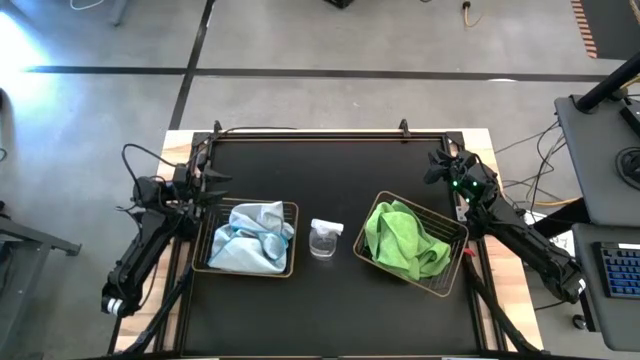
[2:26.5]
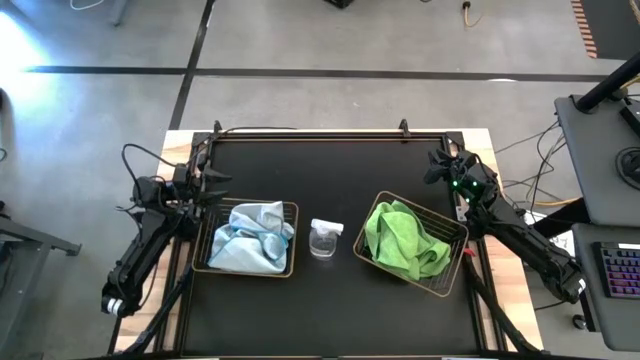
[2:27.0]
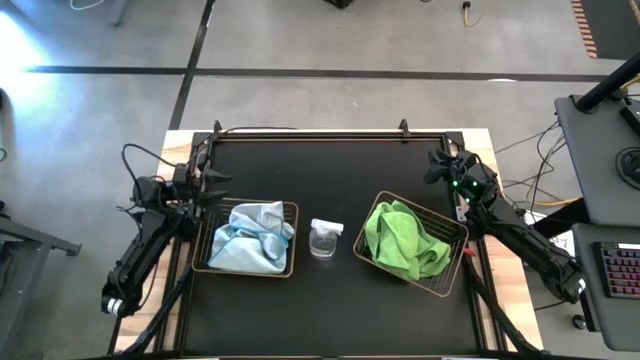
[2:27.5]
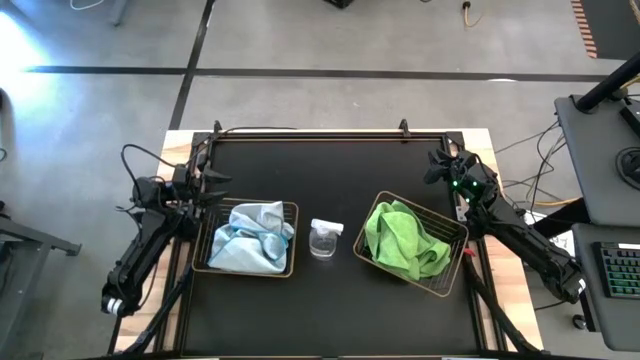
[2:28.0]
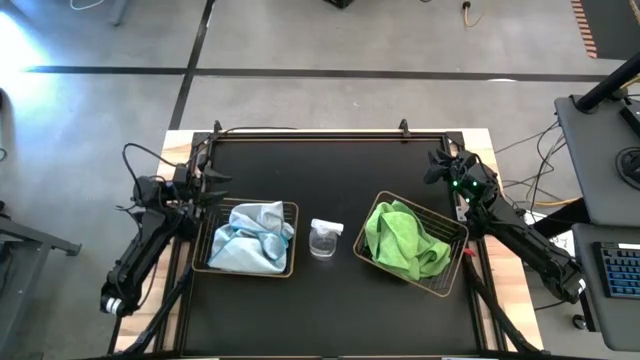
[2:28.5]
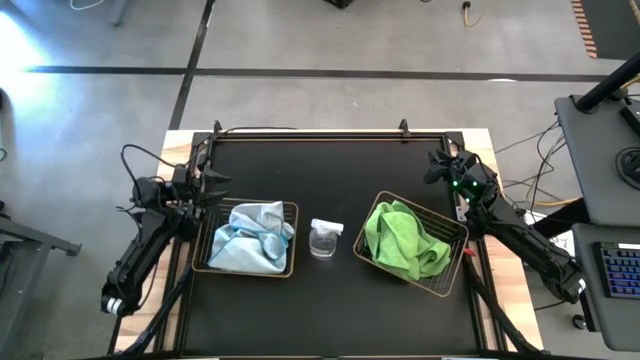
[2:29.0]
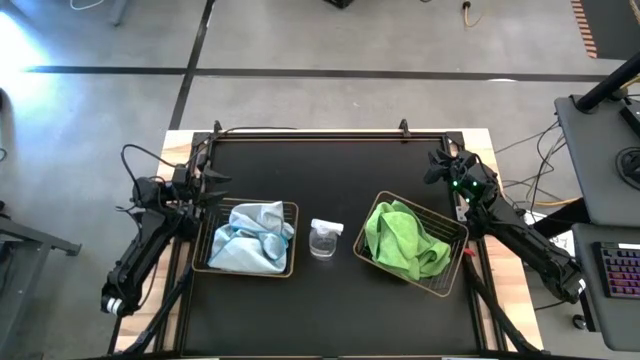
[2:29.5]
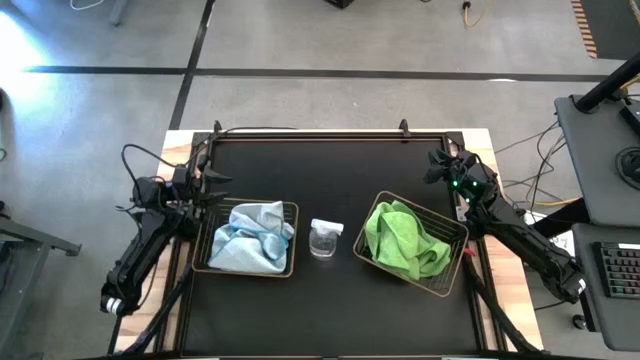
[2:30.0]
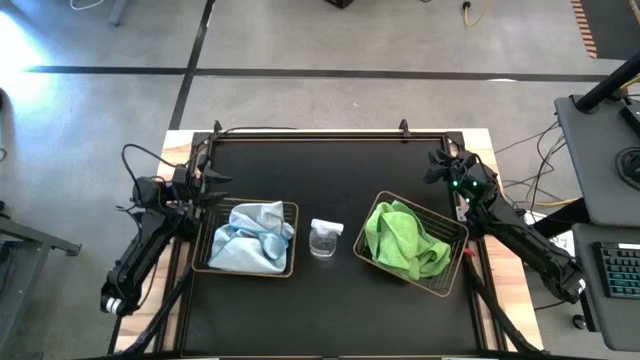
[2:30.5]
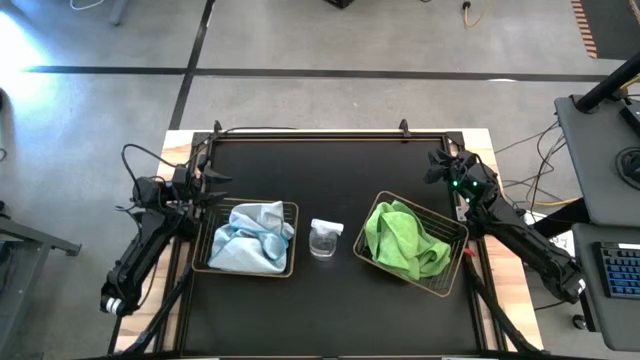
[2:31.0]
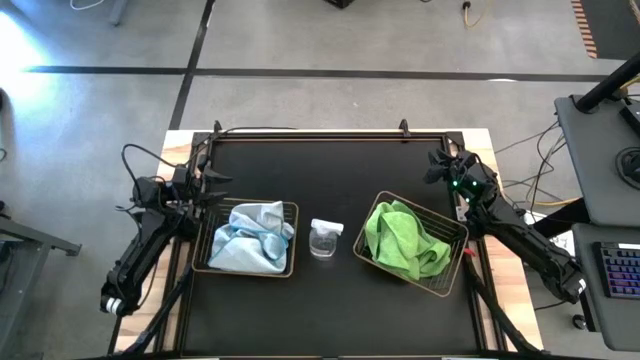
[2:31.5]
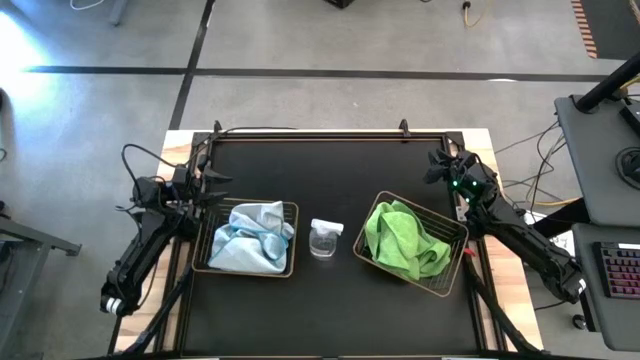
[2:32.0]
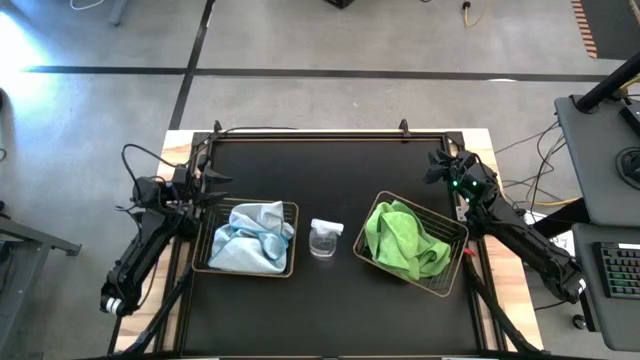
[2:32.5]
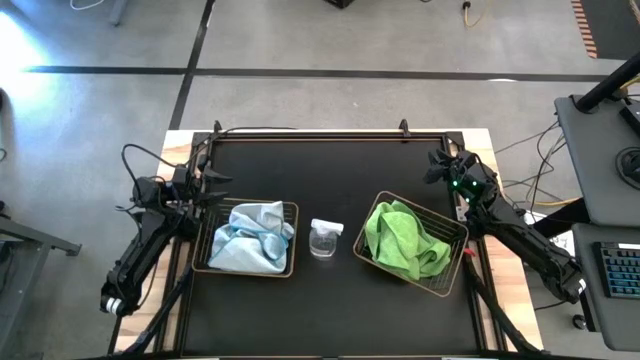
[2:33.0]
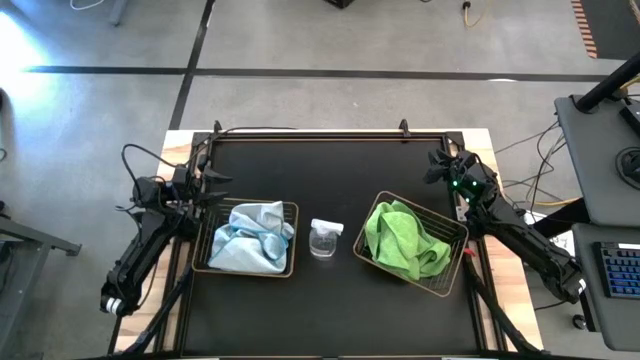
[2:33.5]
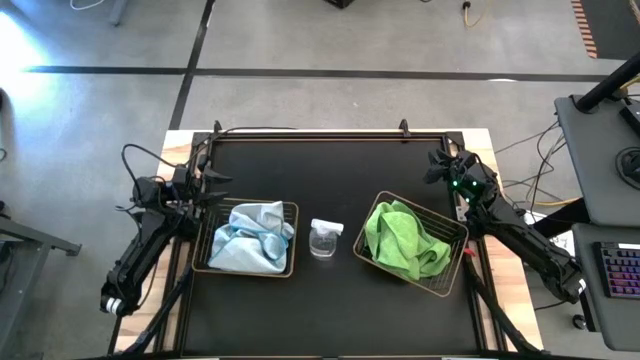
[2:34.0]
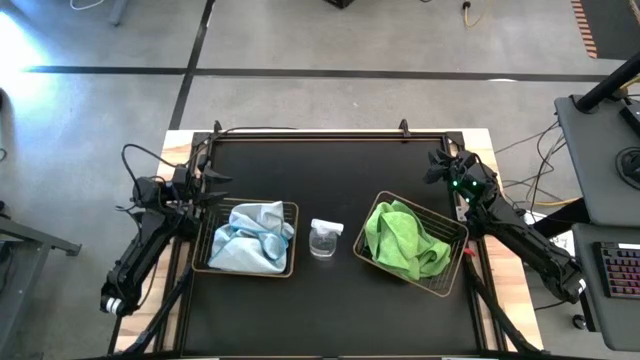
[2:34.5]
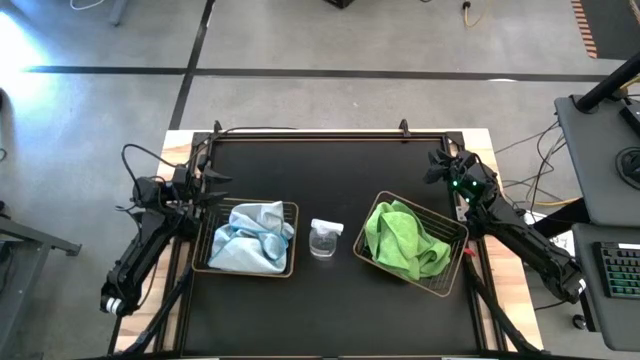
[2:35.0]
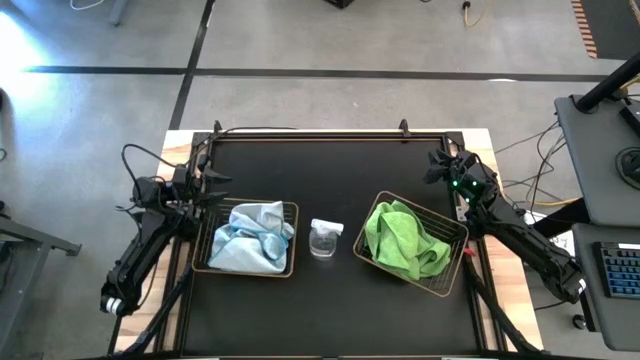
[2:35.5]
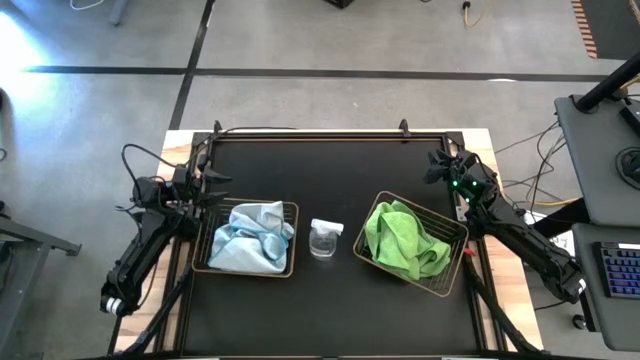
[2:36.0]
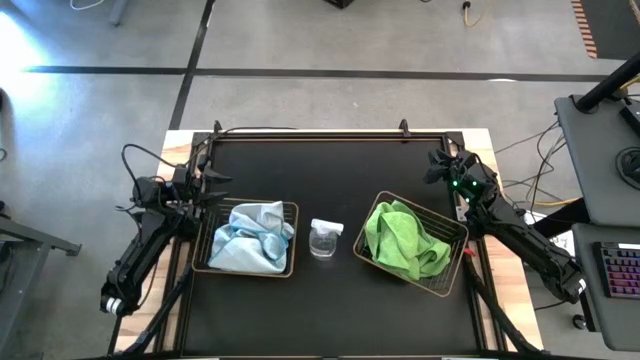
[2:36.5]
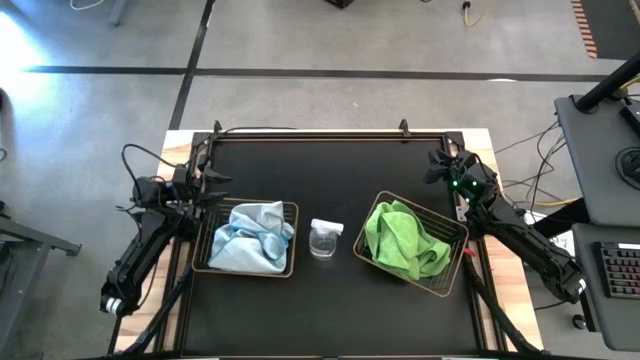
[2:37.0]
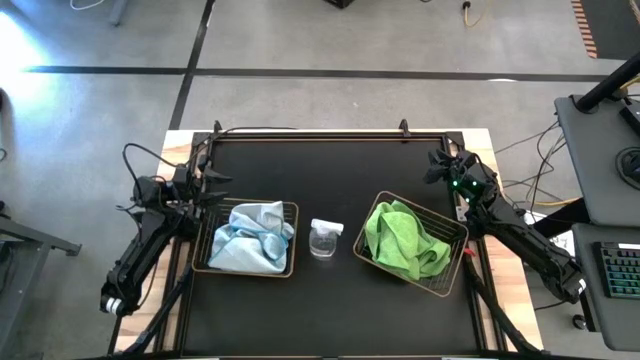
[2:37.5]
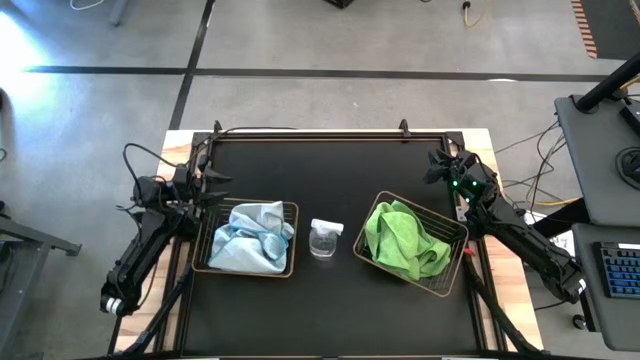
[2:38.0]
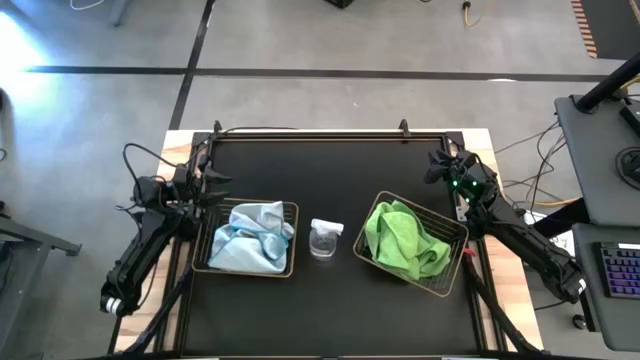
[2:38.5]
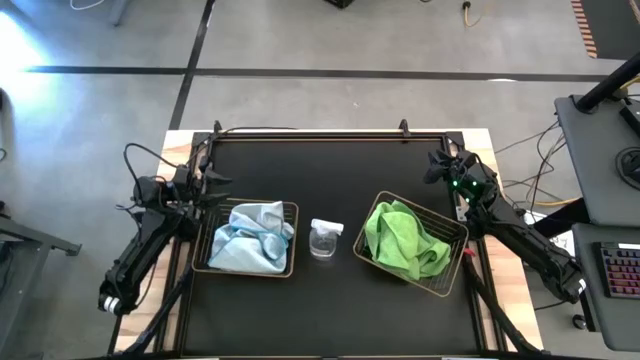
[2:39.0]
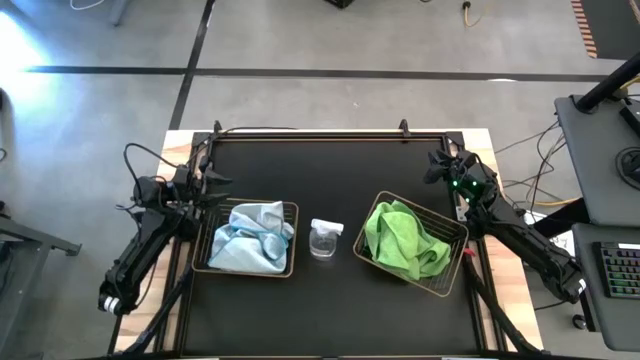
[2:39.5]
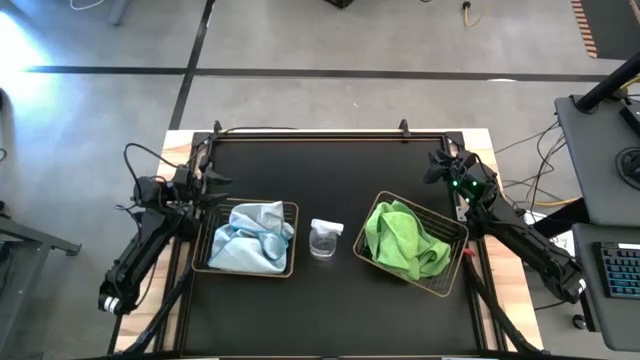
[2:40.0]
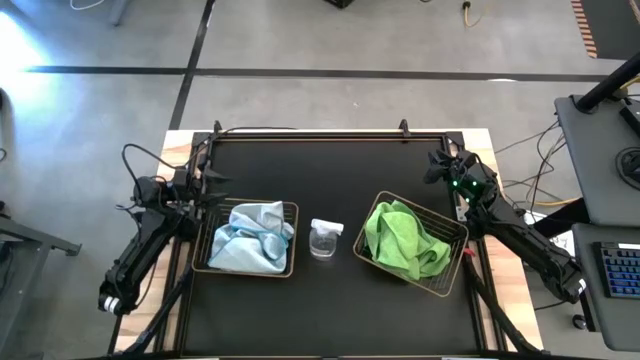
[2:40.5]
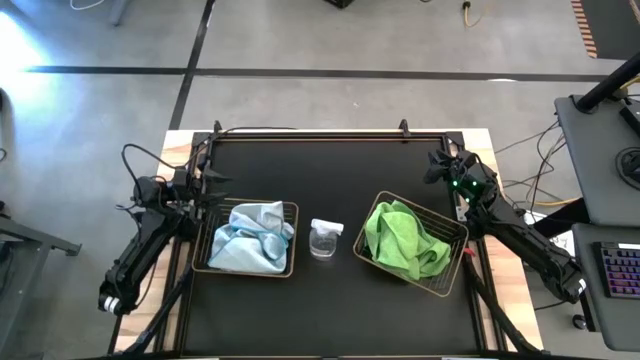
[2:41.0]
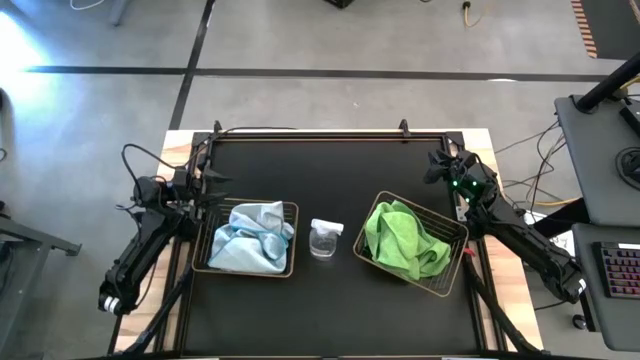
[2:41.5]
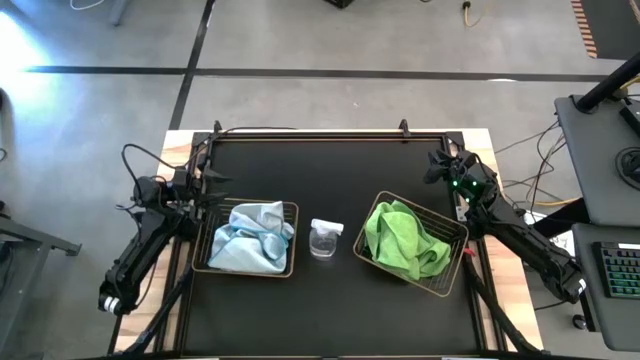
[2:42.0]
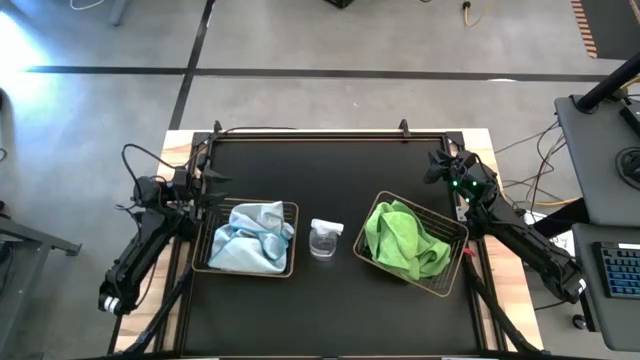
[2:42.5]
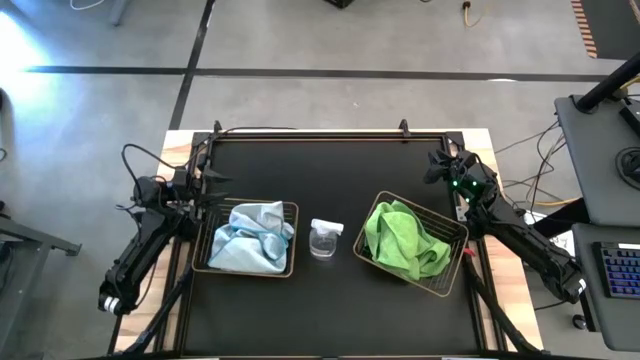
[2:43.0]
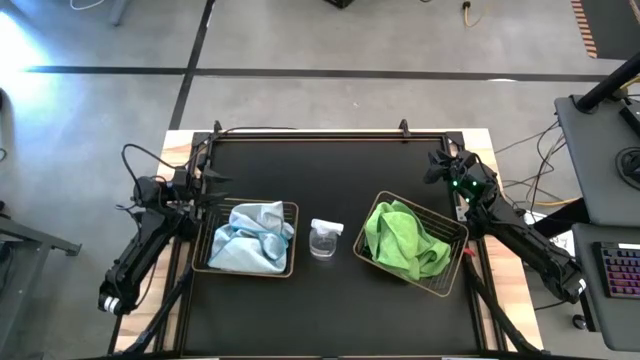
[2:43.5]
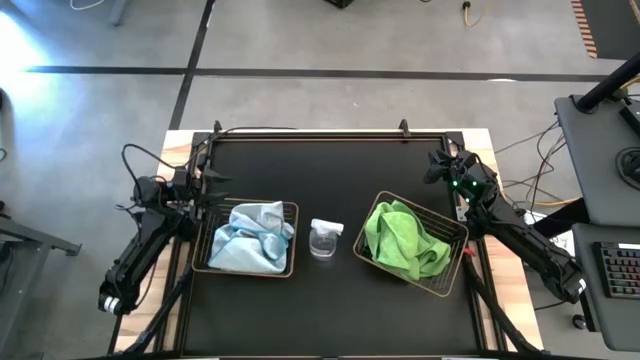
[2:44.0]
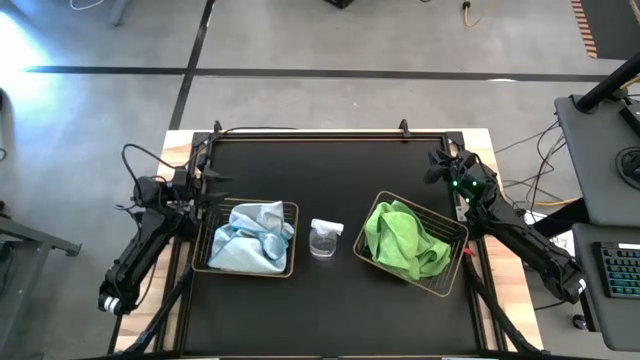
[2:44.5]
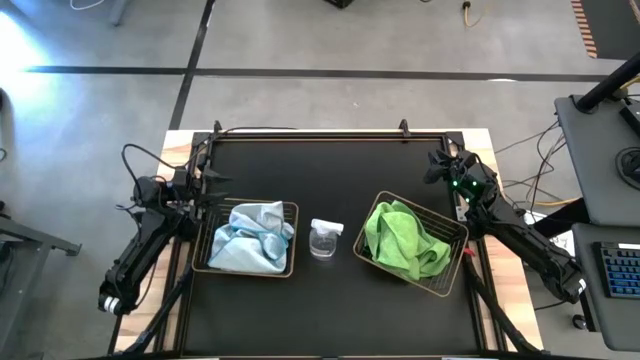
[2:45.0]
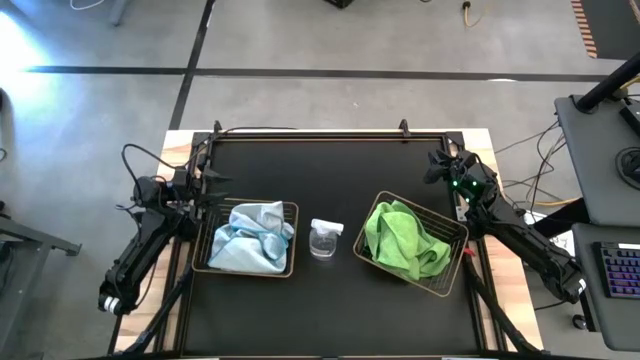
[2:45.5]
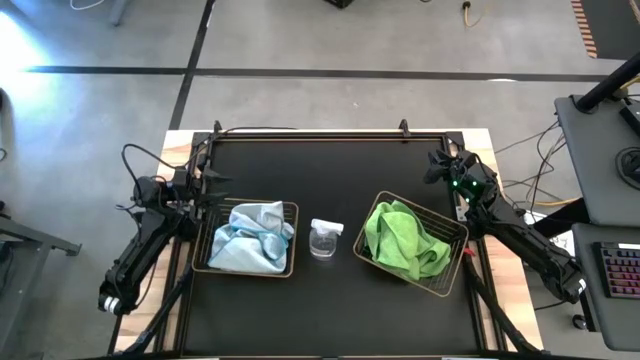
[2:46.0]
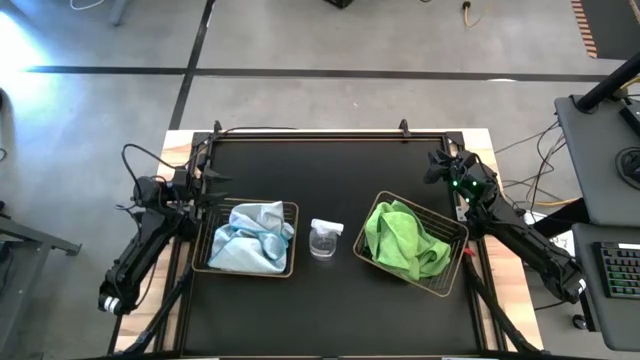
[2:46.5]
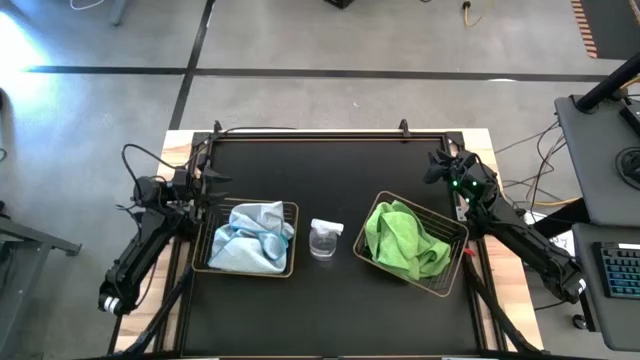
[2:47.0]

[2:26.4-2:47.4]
Task: Sort microfiber towel by color & place in baskets
Return to Home Position

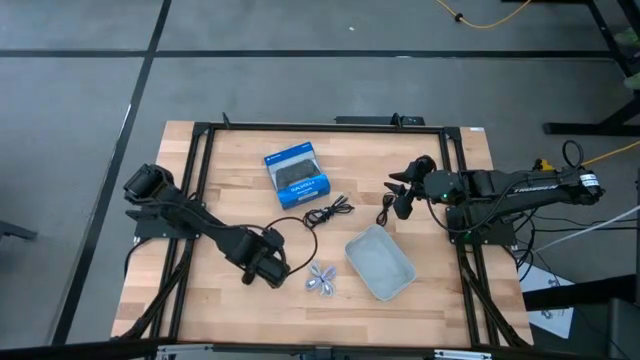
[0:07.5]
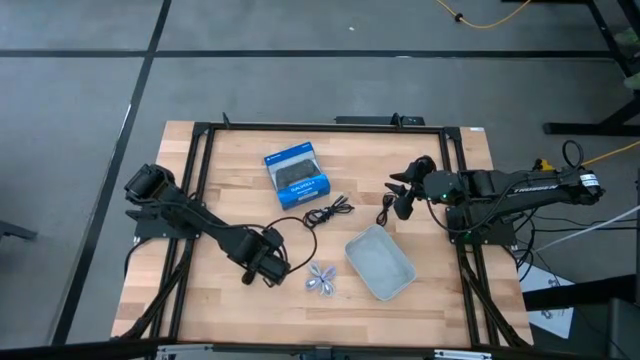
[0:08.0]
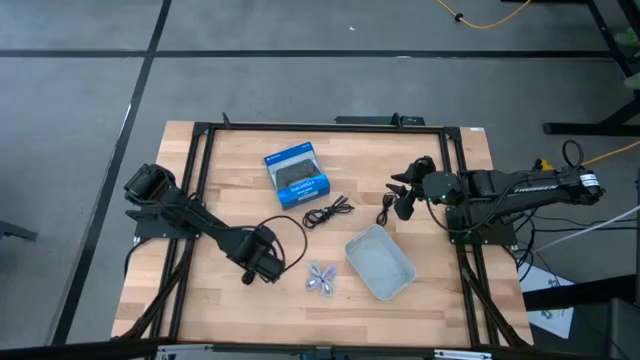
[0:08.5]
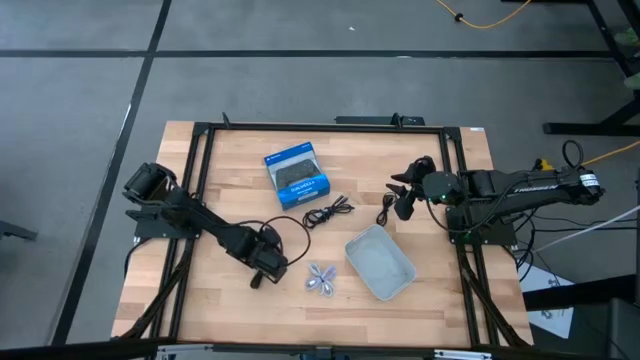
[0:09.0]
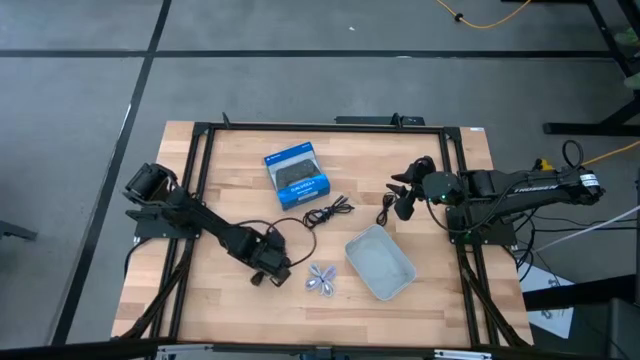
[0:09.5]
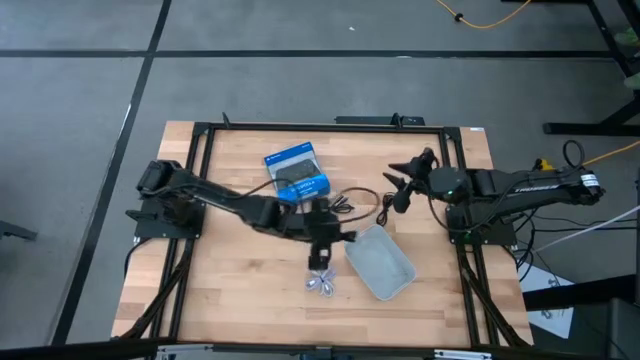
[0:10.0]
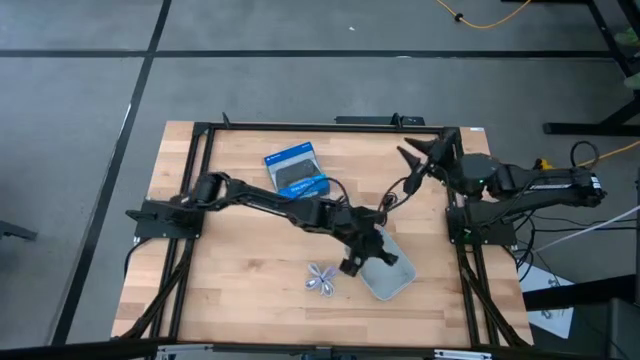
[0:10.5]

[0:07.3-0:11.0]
Task: Pick and place USB-C Cables
Put the bottom black charger cable into the white bin
